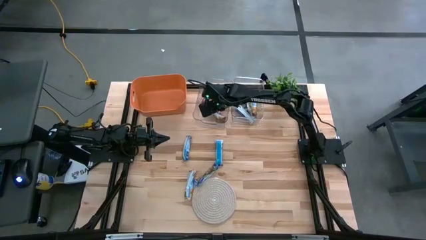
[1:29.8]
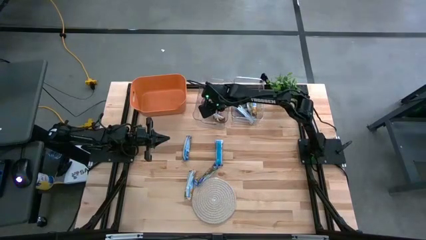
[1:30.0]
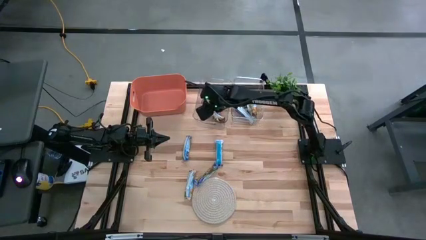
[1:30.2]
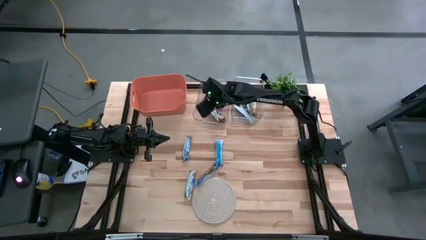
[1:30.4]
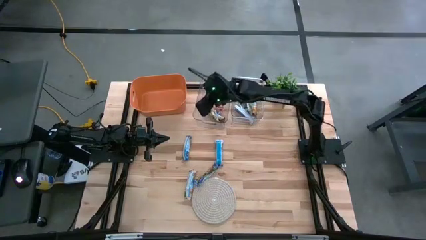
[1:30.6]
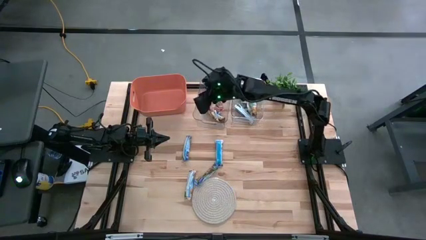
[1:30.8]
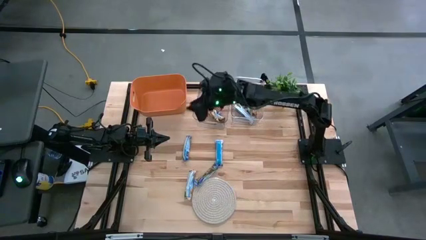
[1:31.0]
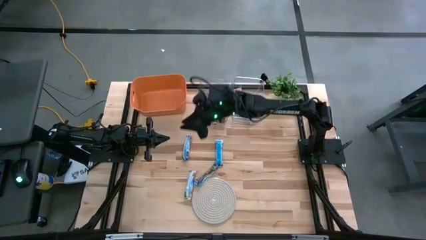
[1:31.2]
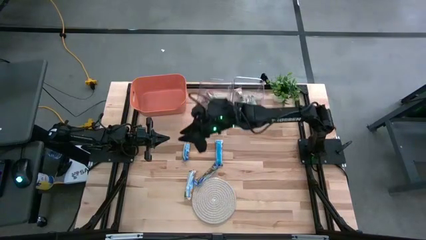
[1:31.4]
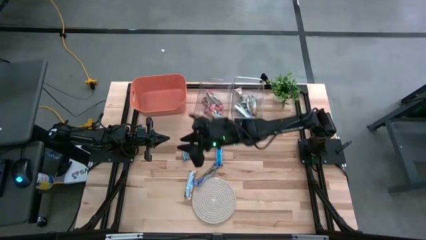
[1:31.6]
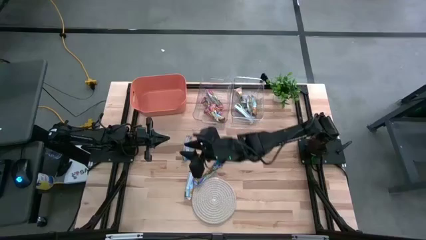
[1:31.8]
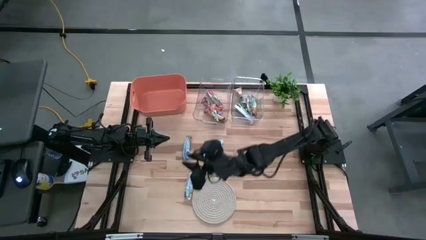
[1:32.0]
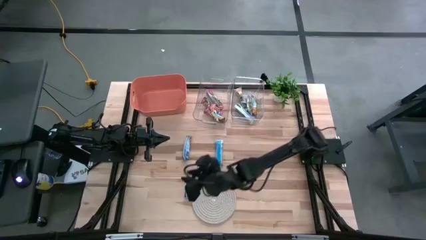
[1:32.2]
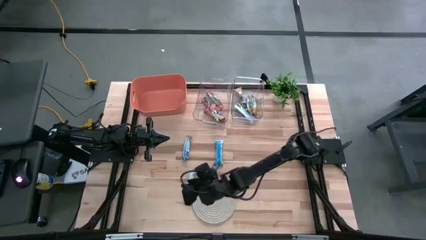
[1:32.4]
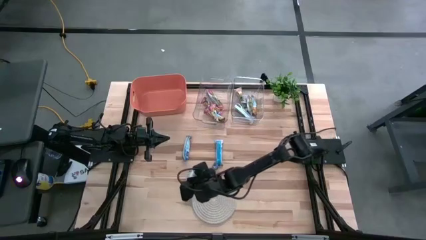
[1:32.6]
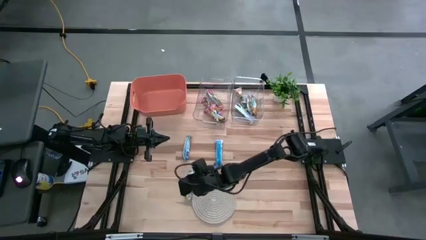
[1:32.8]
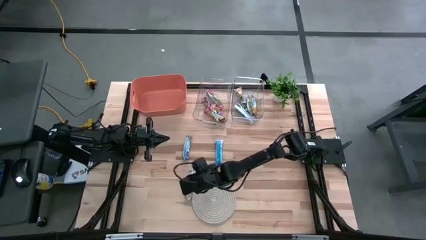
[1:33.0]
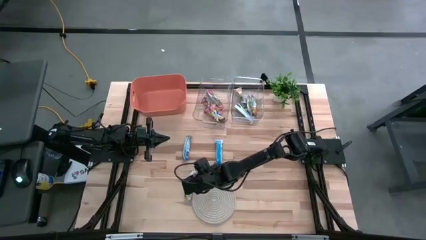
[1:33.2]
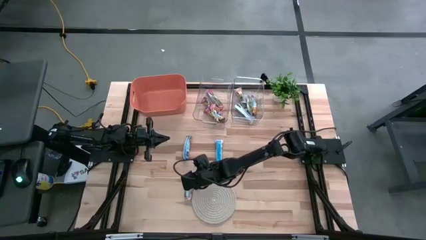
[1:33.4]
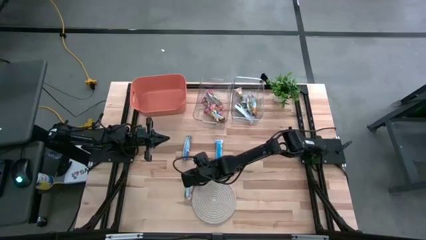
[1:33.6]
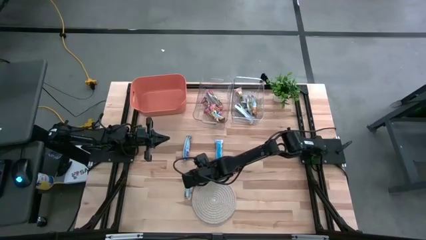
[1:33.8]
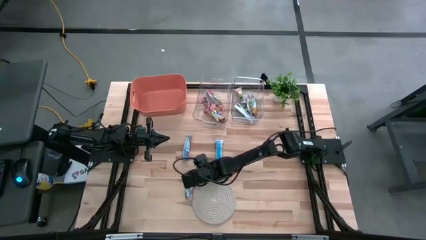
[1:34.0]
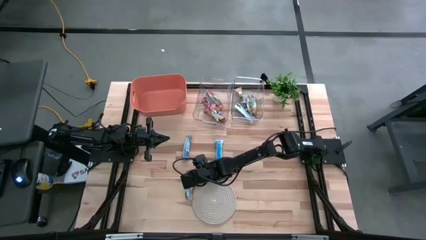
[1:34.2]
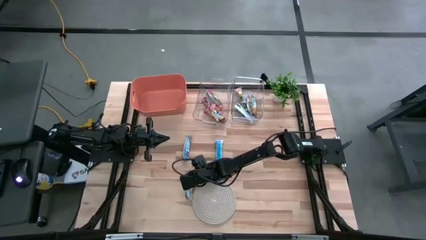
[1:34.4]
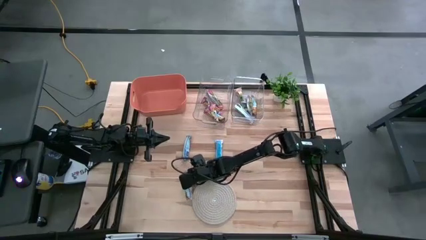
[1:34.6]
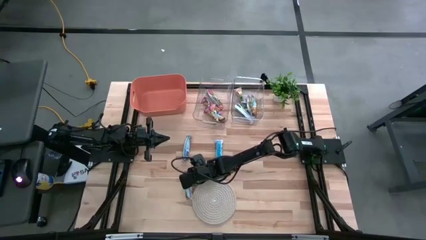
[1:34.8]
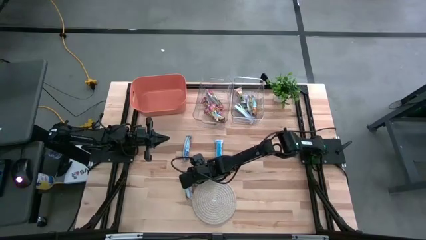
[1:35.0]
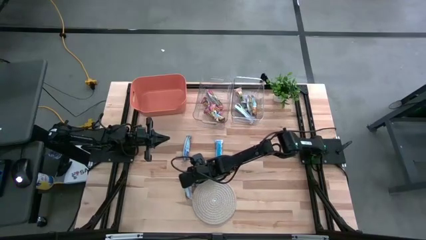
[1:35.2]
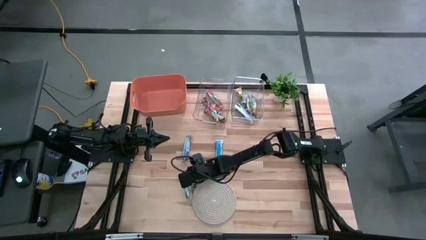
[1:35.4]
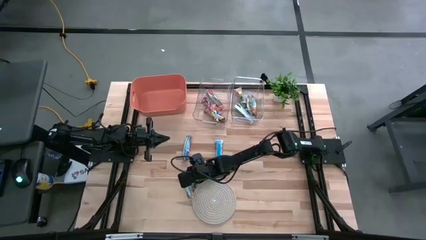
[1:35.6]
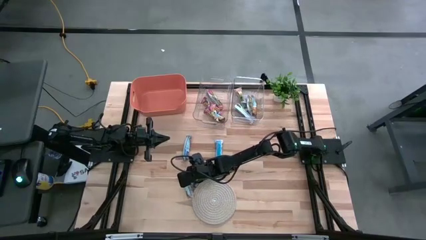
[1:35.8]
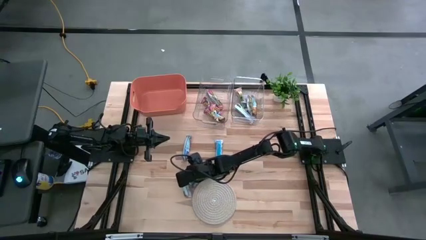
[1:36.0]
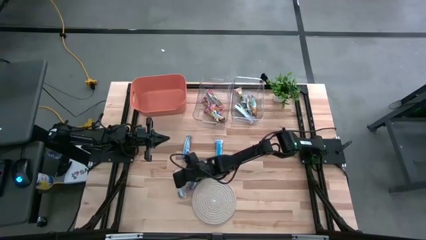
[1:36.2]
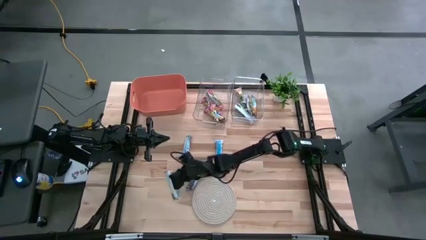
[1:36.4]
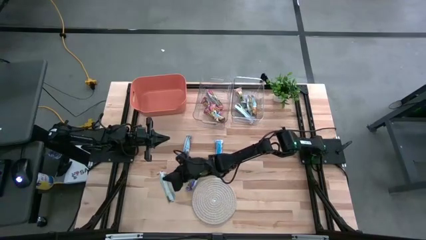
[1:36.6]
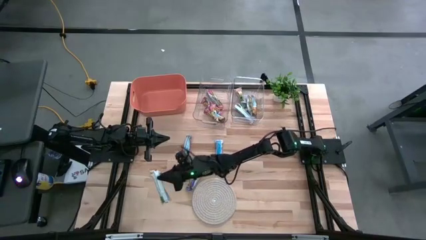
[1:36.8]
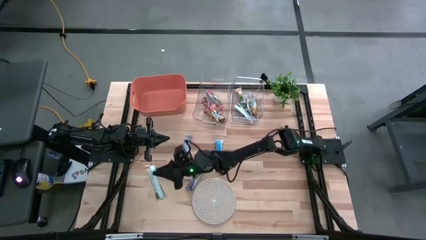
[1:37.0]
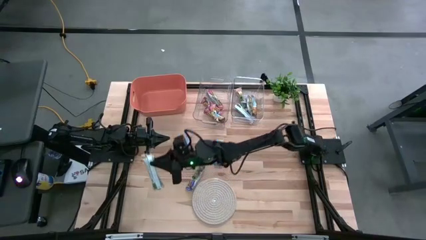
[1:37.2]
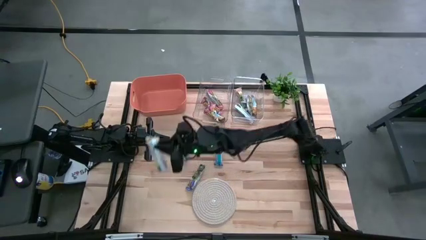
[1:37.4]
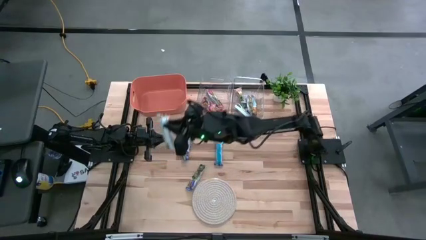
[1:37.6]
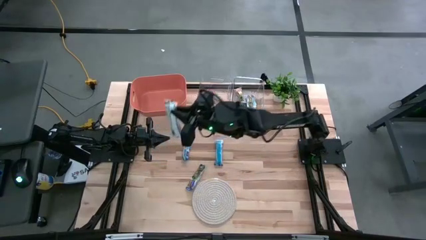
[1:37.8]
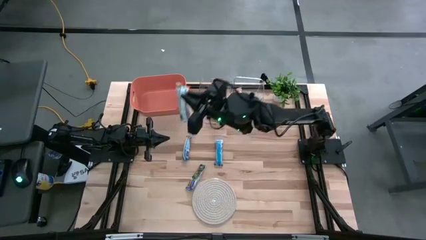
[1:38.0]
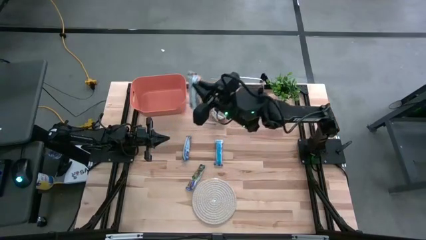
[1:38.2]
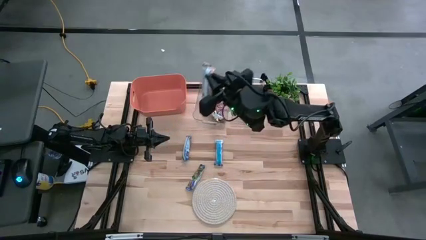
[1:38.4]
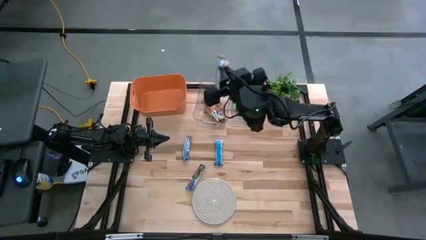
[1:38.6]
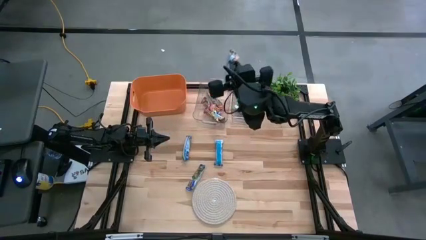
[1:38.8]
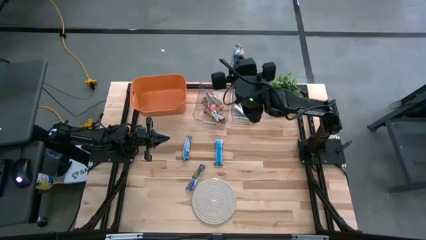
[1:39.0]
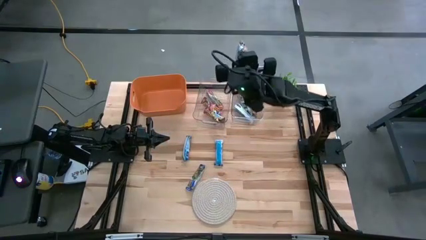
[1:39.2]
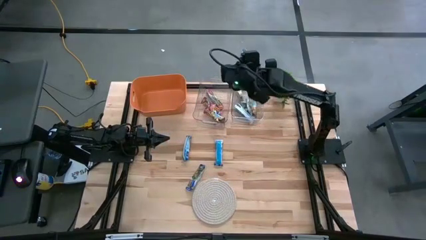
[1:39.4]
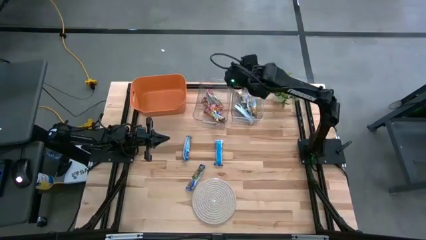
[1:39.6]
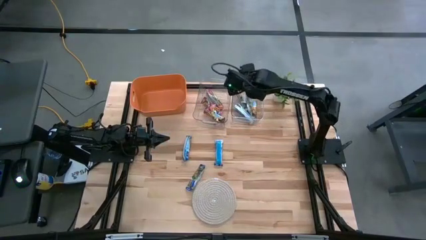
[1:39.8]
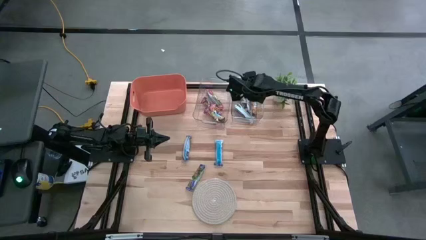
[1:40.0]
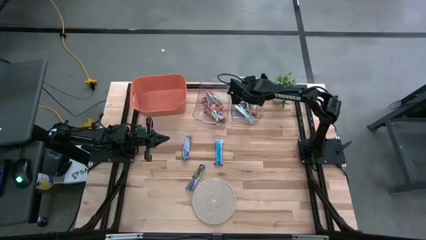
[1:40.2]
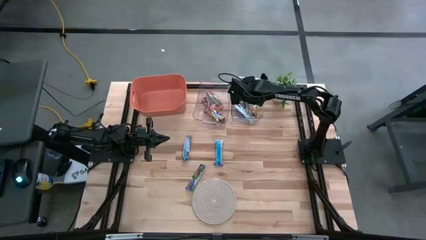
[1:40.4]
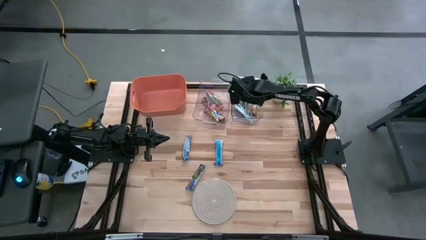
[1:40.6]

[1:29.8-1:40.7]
Task: Pick and place Granola Bars by type
Put the yellow granola bar into the right transparent bin
